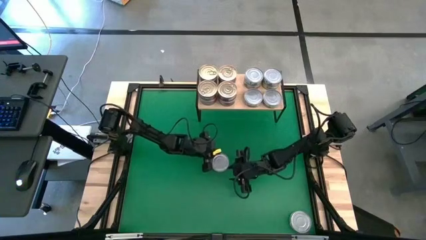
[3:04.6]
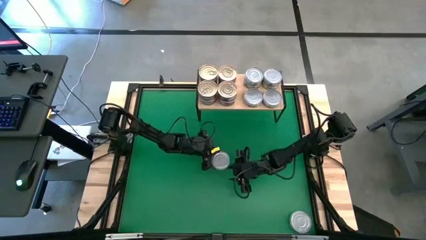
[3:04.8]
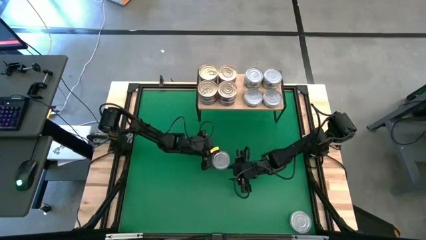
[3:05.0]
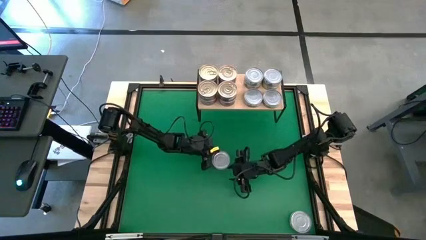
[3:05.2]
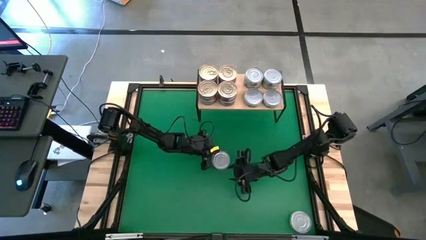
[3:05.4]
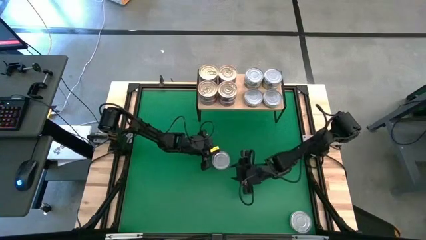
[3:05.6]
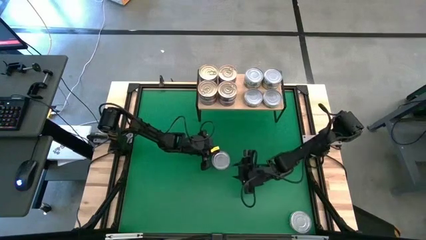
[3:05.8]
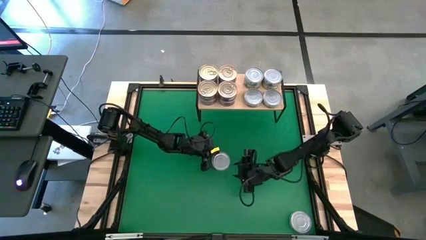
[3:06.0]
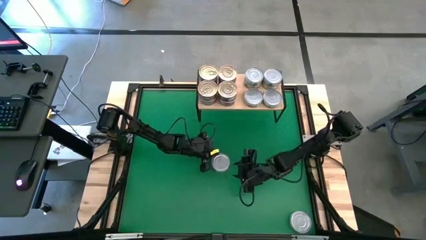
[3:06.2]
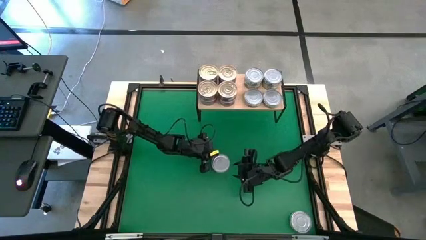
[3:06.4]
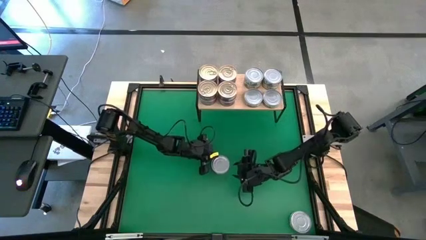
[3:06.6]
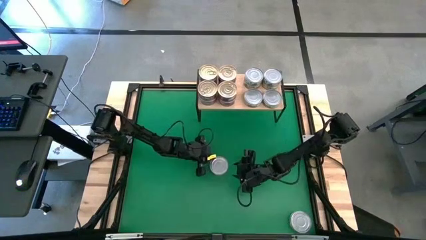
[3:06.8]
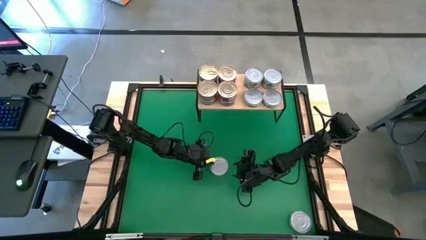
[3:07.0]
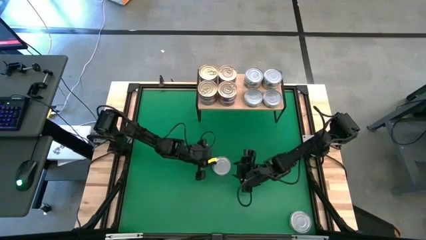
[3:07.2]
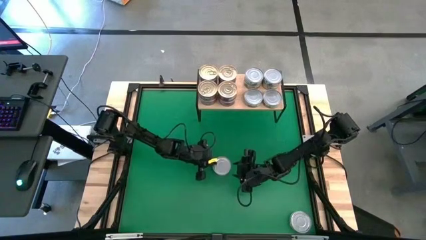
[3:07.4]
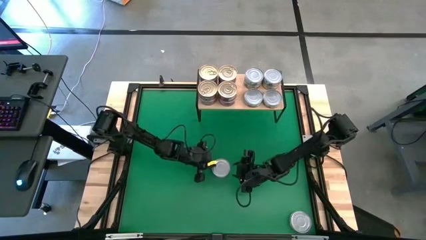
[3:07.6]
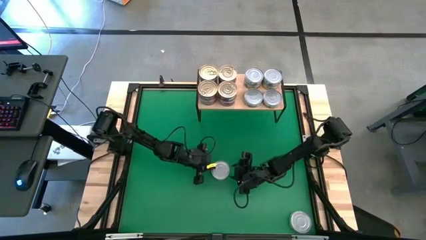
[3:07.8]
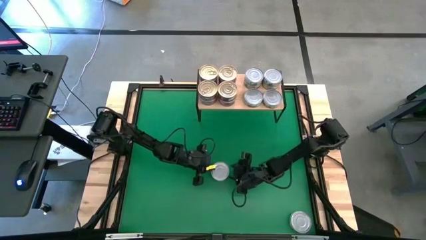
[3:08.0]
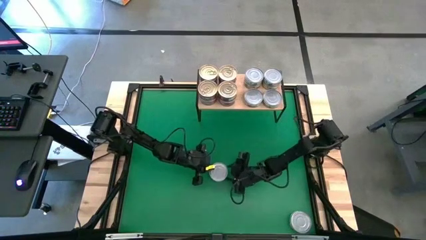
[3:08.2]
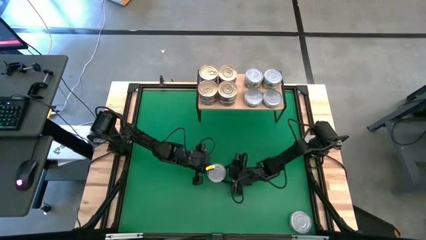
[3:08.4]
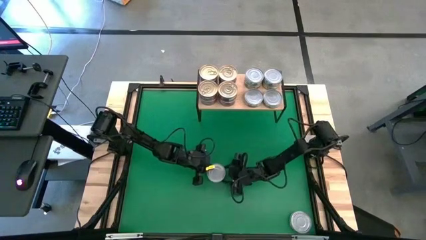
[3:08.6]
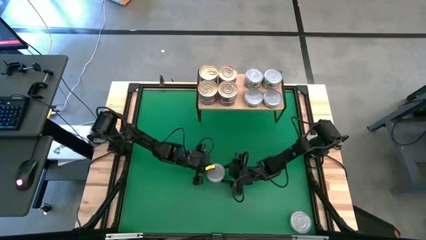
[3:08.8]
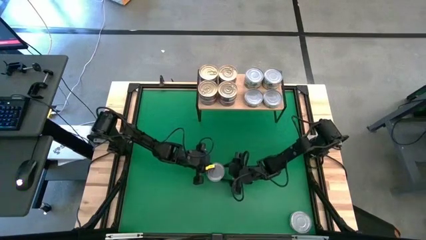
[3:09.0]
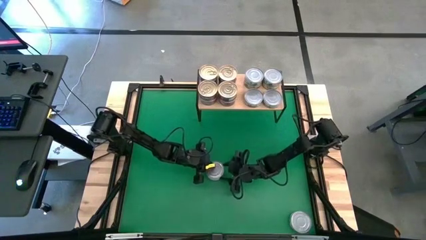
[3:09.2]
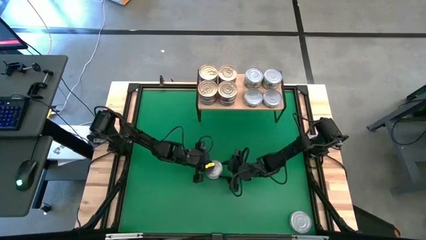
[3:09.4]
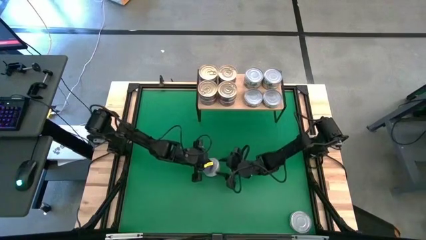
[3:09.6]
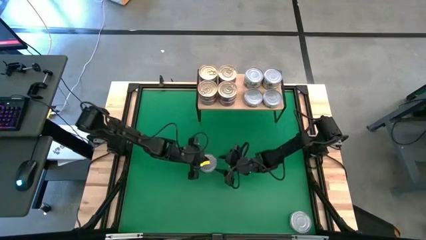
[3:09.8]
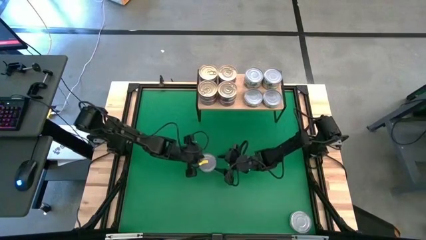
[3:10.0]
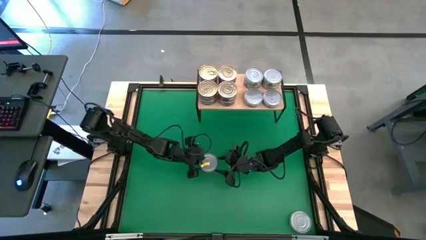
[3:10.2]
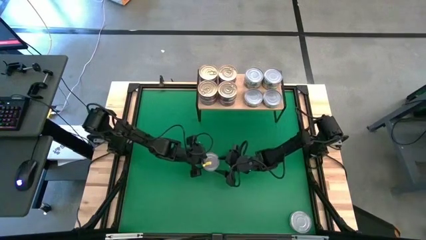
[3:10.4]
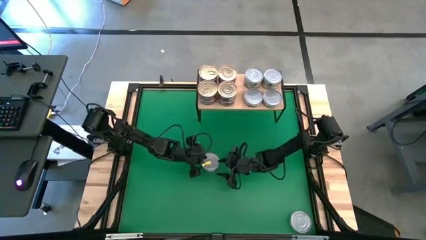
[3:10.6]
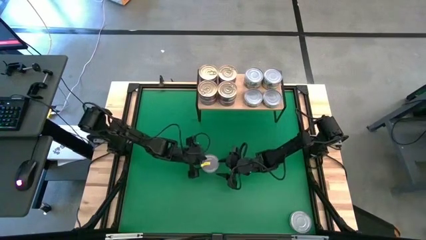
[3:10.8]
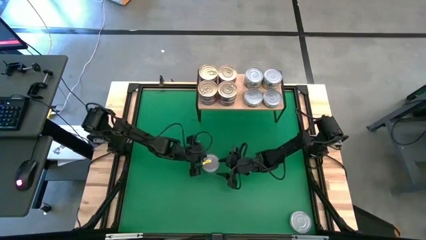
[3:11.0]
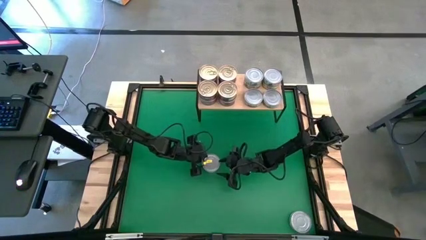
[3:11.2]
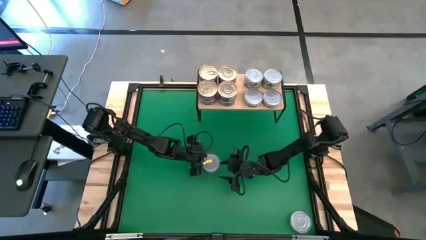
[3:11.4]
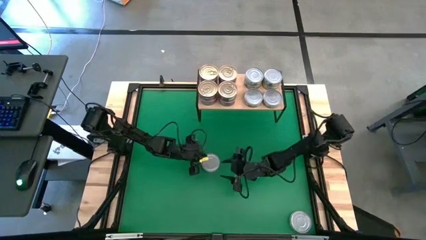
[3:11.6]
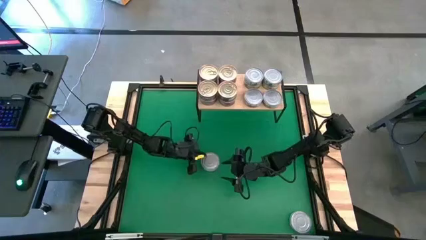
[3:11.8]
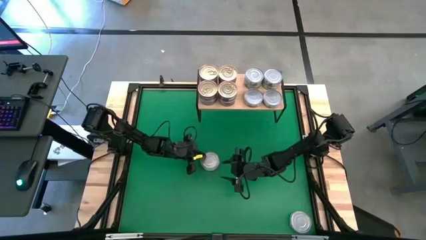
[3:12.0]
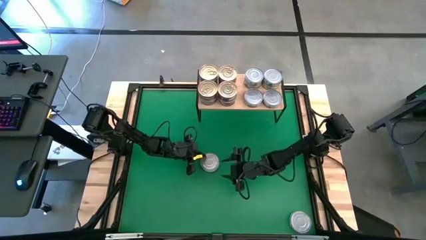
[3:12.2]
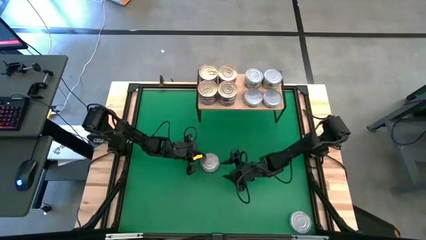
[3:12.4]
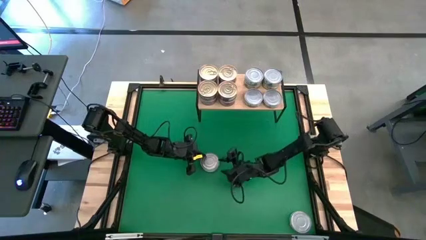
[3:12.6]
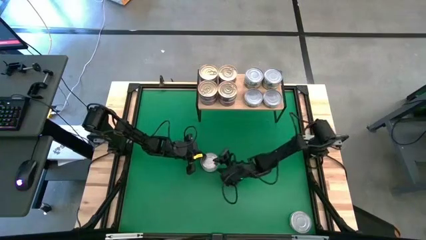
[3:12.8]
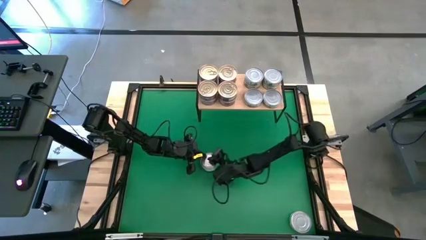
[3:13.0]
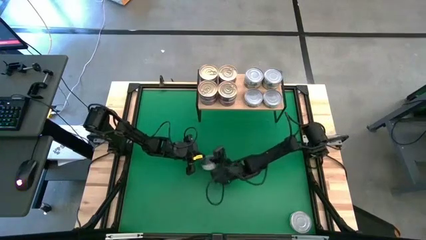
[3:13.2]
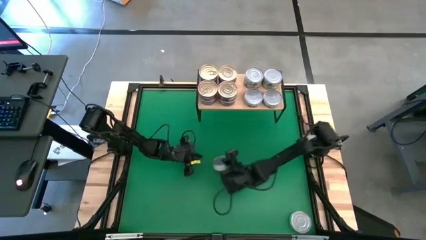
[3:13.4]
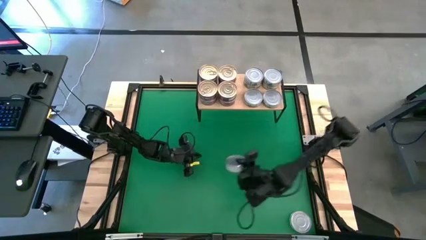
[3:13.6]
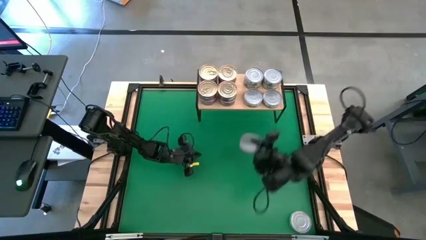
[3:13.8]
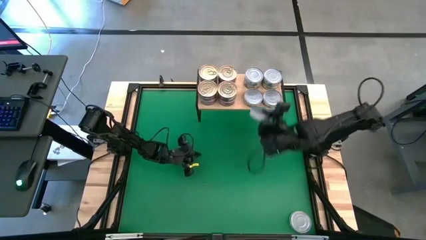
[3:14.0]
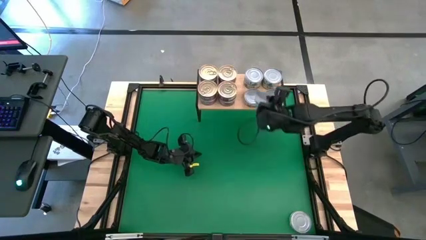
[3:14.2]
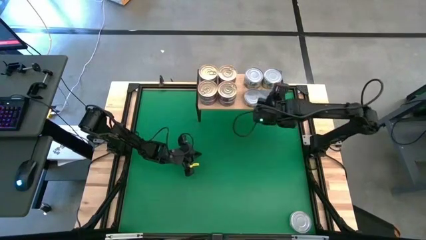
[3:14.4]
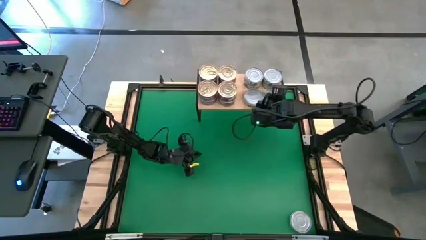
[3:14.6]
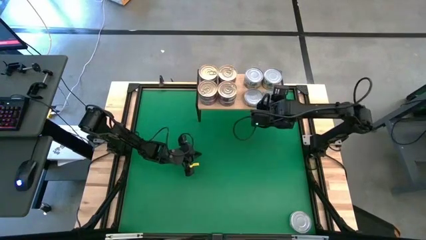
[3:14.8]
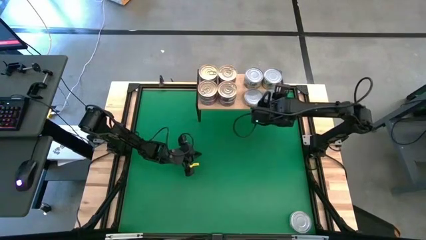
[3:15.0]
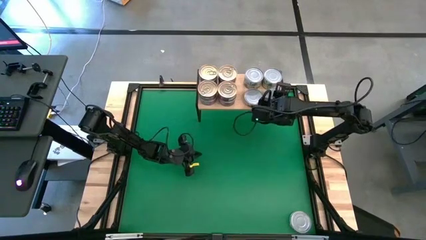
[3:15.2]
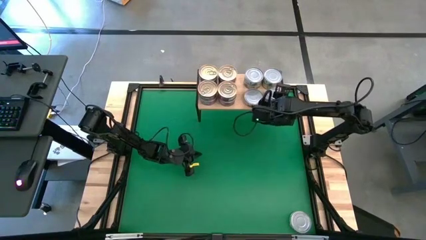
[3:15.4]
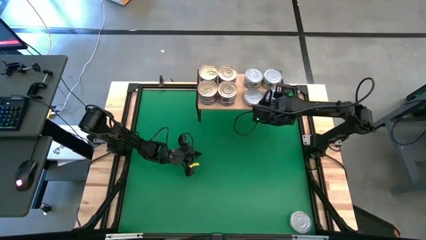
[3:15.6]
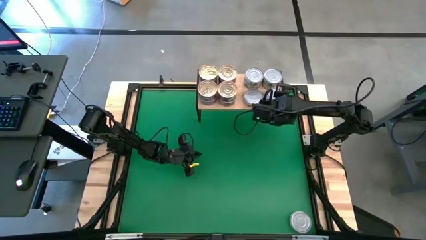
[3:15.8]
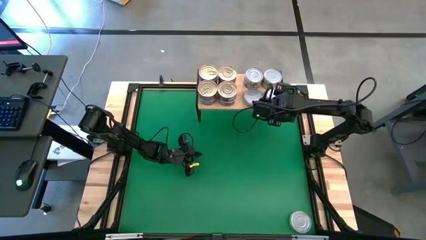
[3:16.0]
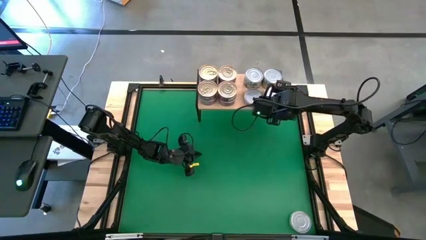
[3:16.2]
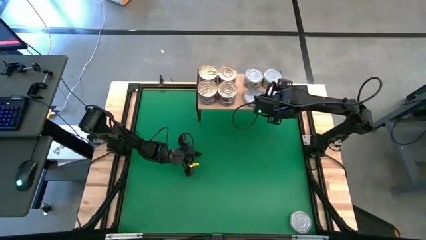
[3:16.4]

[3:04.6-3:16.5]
Task: Stack canned seafood by type on shelf
Stack the green tuna can on top of the green tuna can on the shelf

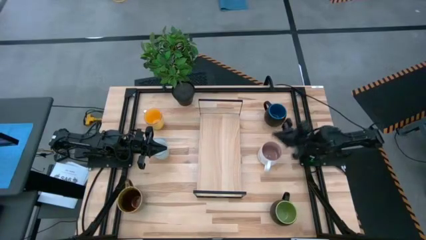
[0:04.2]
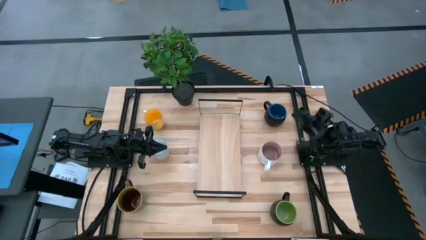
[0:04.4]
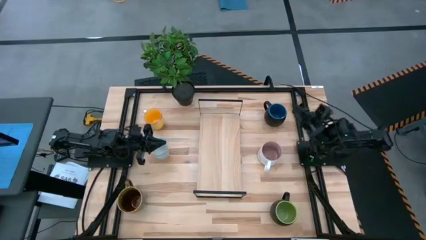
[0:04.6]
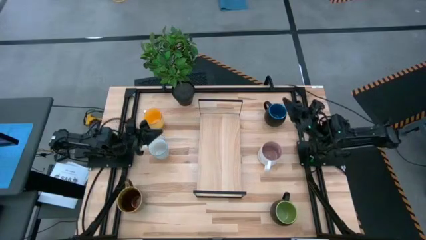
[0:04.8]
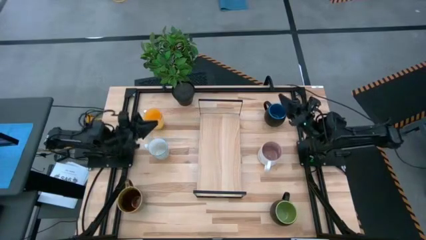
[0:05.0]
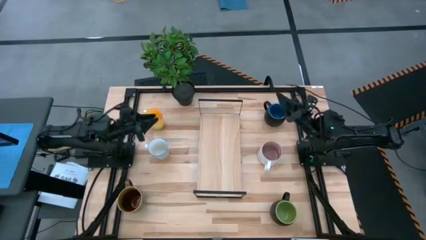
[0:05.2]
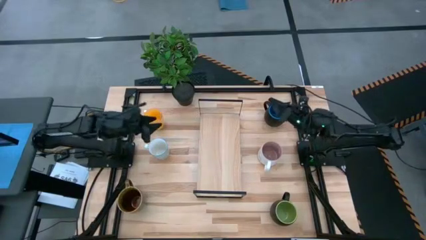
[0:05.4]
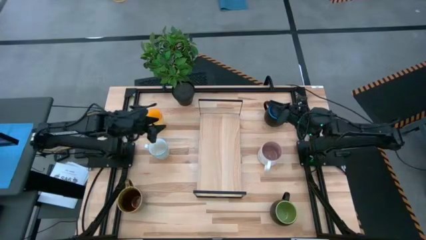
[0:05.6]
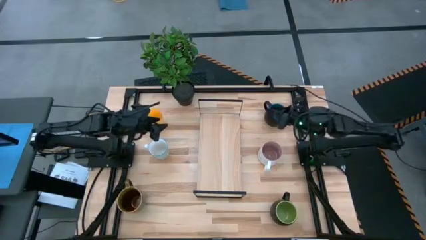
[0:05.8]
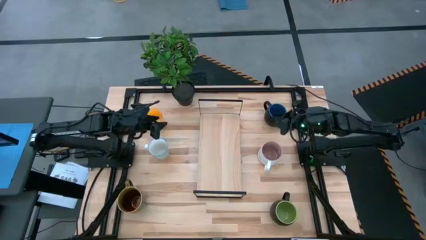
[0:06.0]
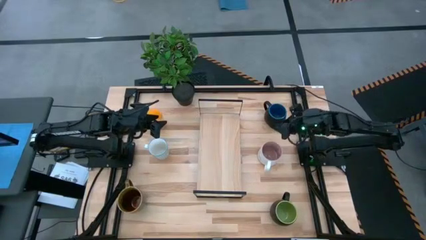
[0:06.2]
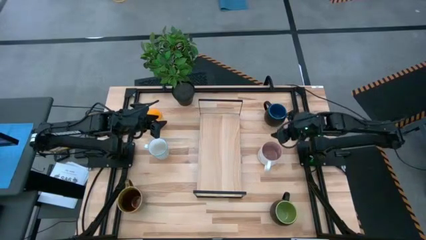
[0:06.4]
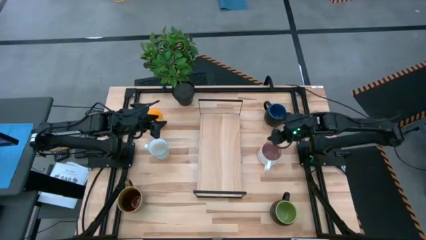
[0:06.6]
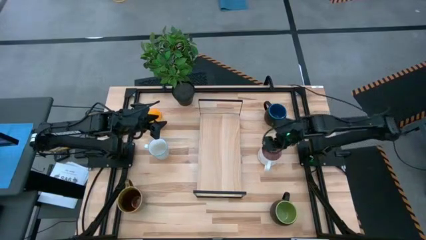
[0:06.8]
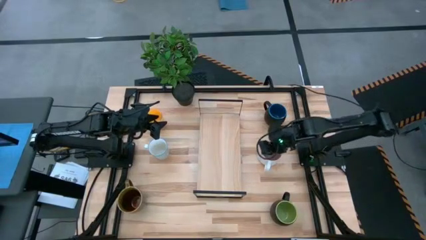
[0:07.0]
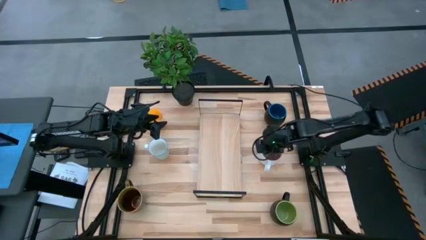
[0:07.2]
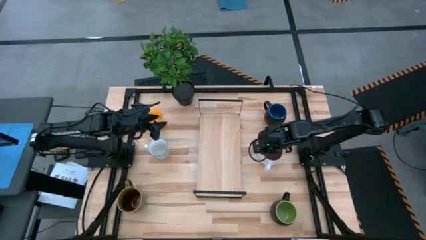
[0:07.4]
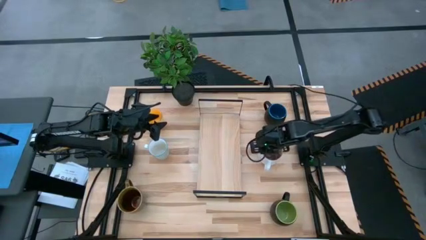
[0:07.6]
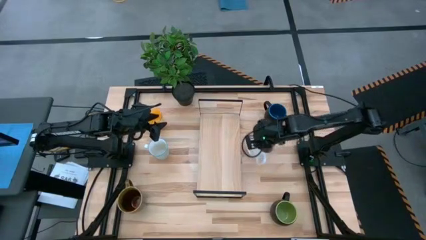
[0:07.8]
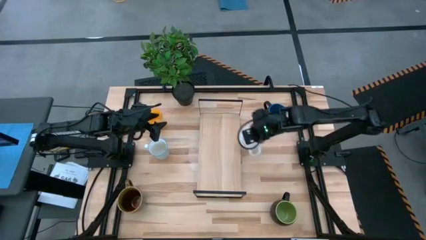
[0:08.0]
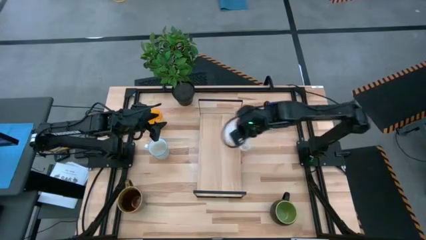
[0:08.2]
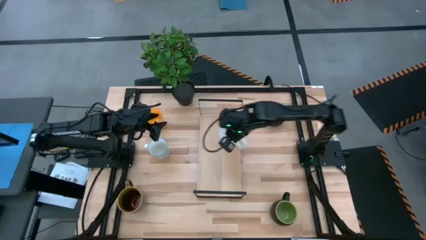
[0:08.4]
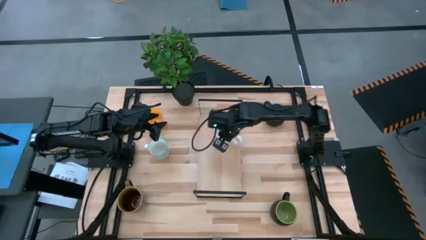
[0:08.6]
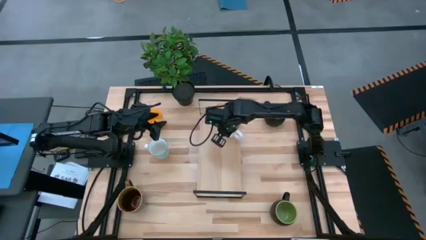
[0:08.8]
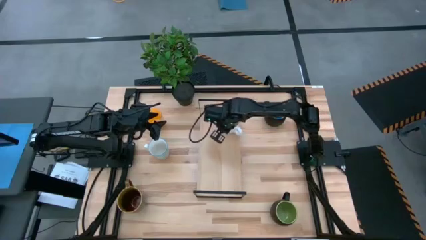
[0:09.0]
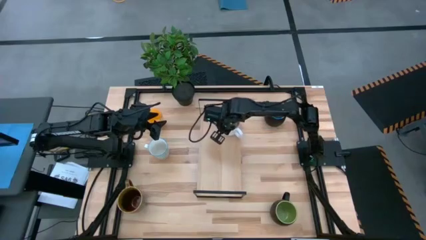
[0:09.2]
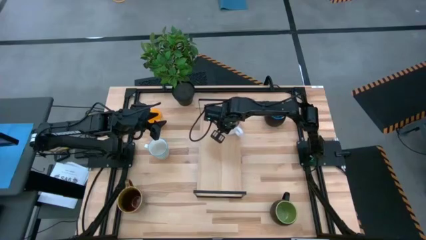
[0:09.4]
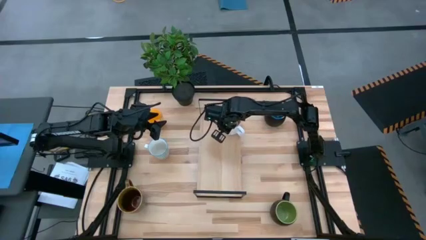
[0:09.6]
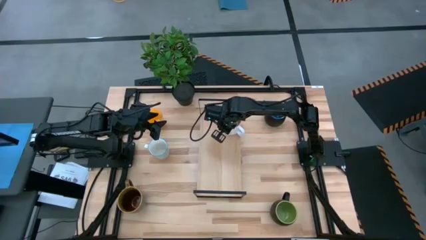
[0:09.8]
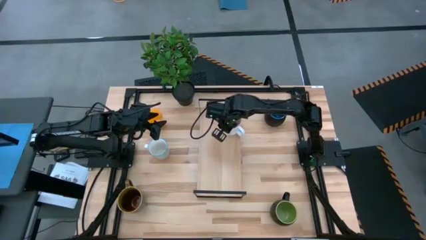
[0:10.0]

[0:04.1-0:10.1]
Task: Place coffee mugs
Put the white pink mug on the shelf
